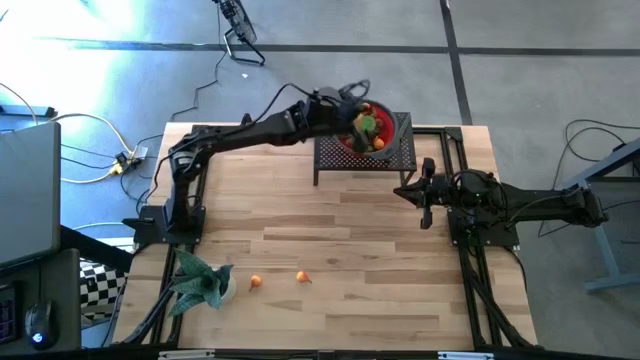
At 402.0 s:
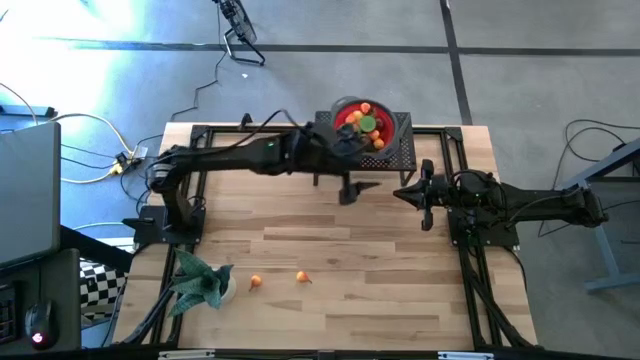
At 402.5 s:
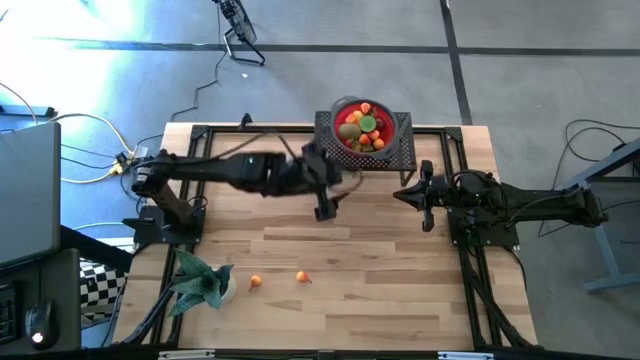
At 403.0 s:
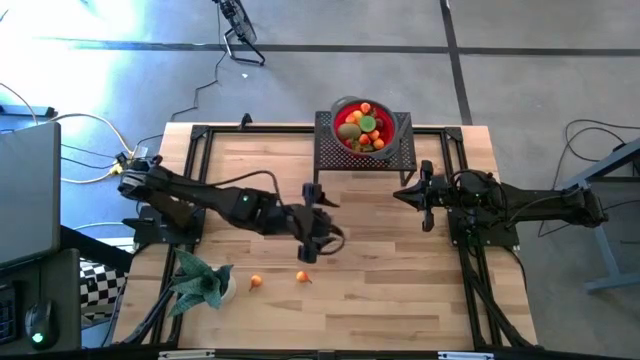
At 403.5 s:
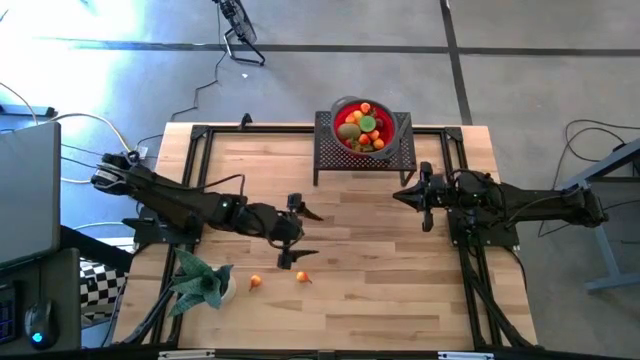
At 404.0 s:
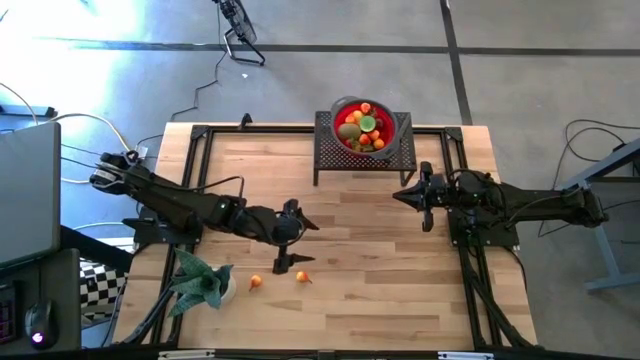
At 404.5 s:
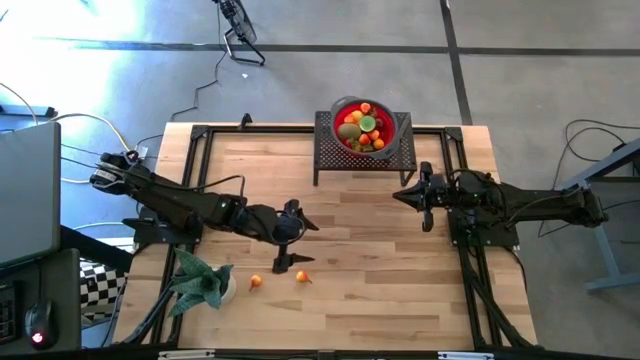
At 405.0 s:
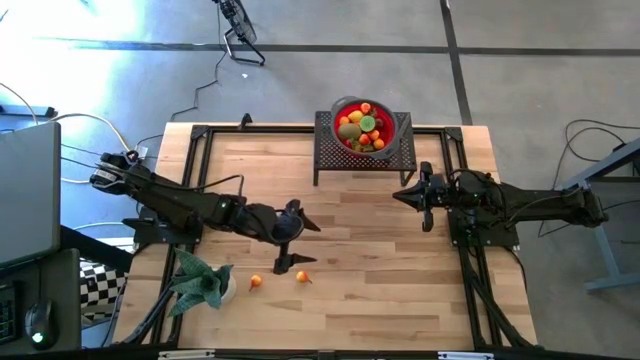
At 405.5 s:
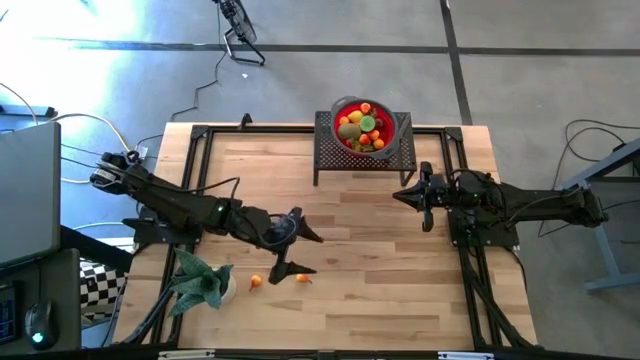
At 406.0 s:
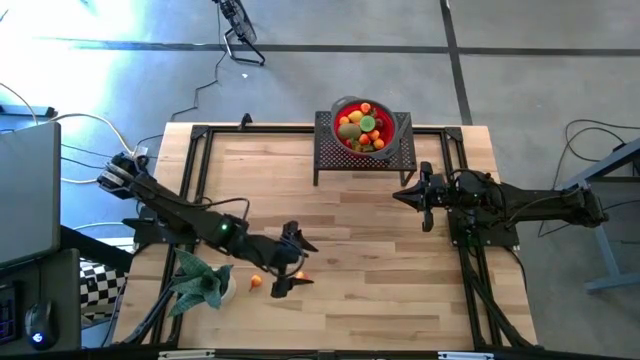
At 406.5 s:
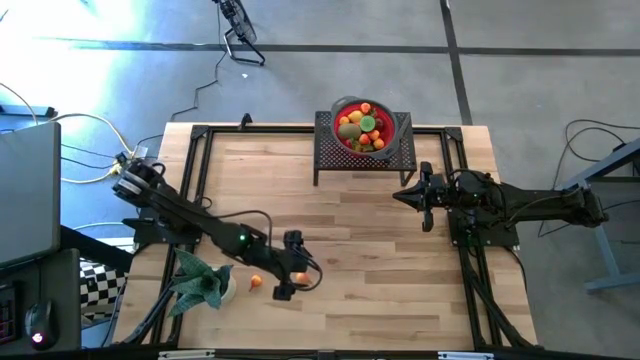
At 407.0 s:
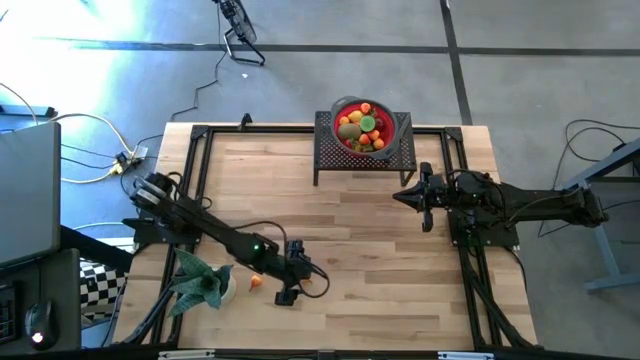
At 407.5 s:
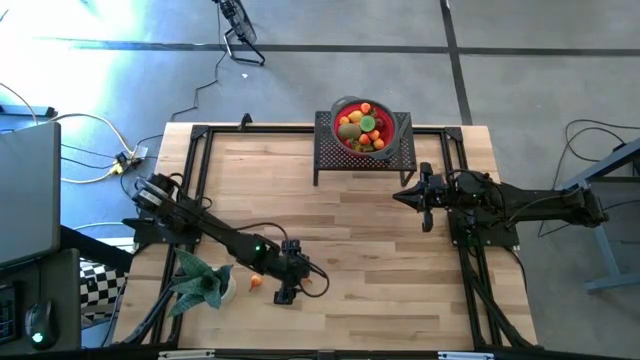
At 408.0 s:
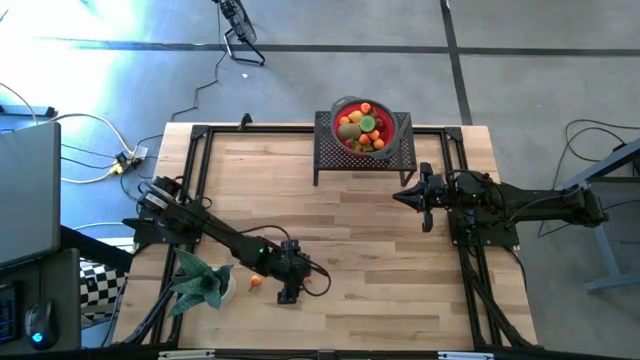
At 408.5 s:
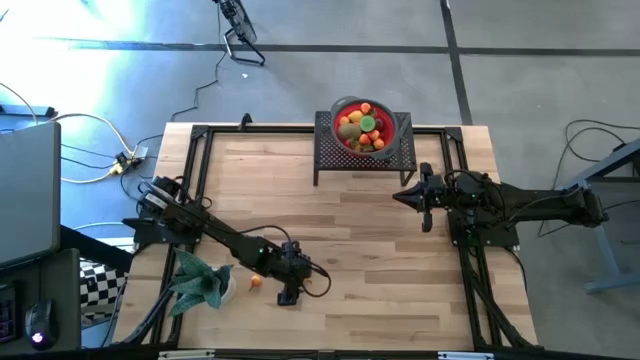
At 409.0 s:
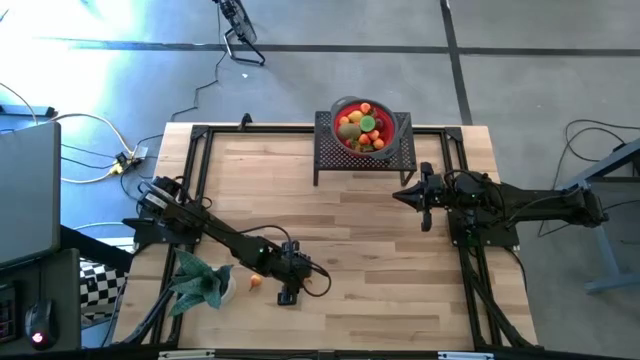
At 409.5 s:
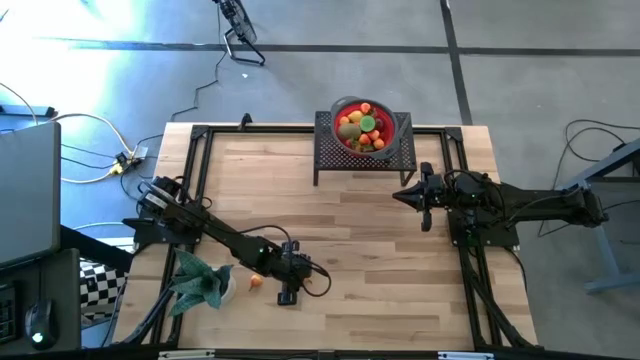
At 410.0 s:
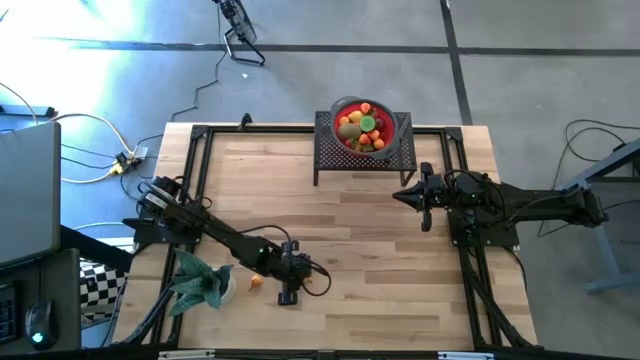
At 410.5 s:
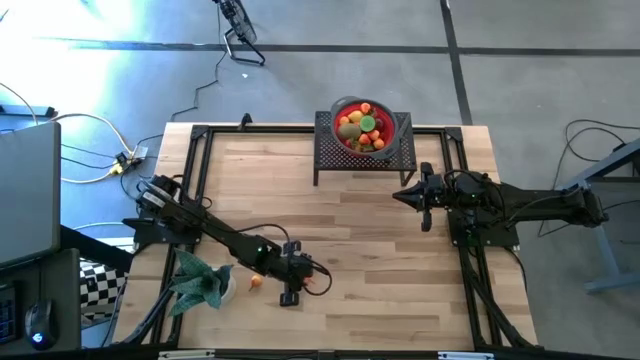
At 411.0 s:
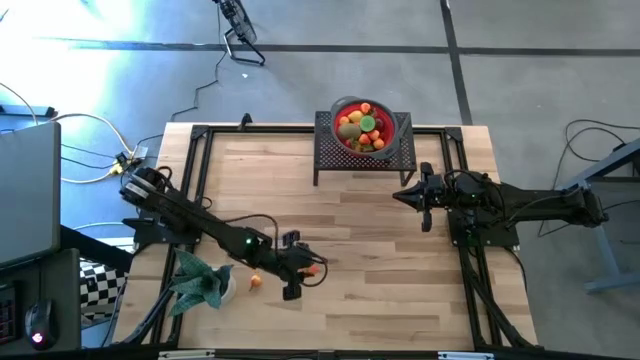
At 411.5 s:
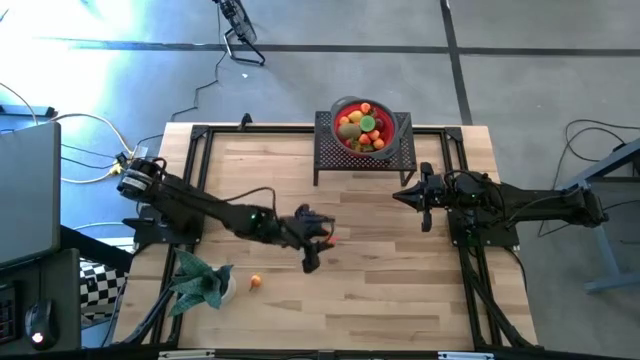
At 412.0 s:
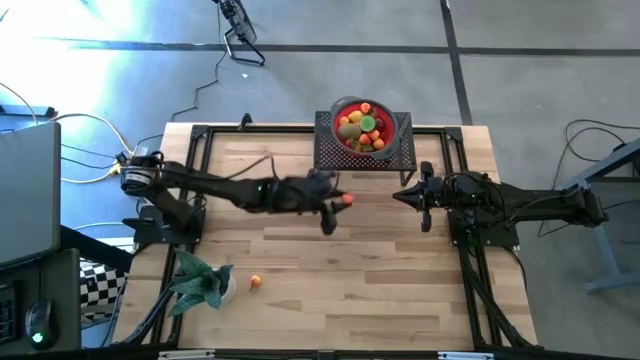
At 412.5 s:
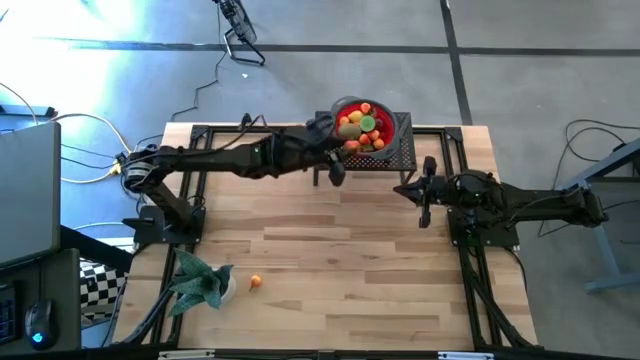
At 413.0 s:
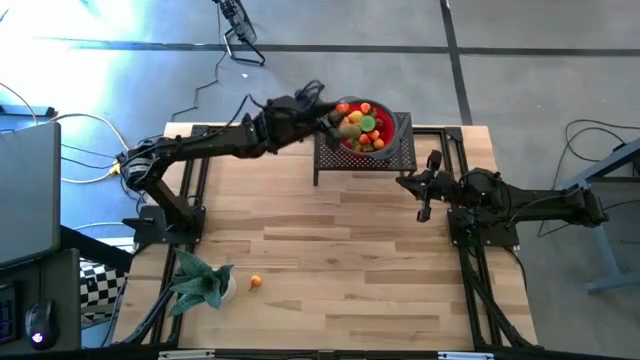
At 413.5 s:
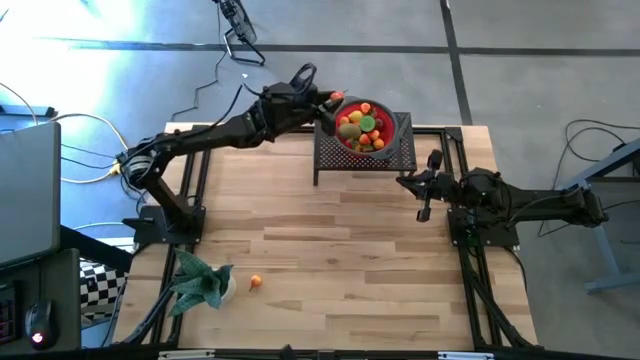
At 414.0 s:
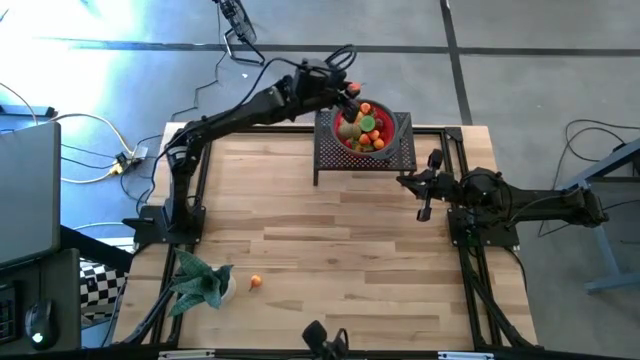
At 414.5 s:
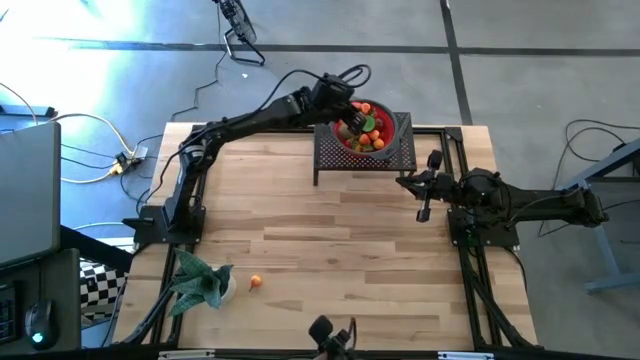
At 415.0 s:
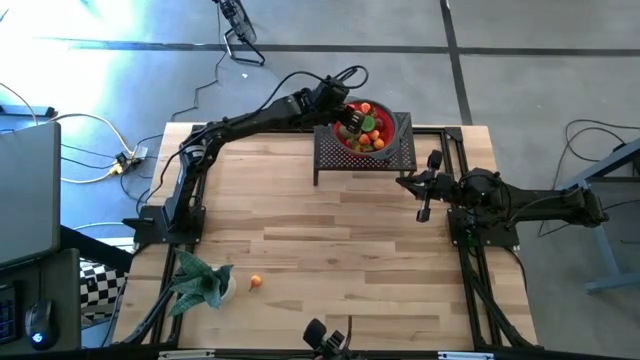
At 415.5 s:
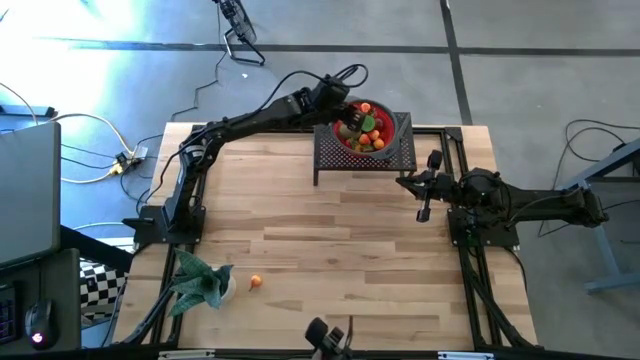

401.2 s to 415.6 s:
Task: Pick & Place Fruit
Put the pear into the strainer on the shelf

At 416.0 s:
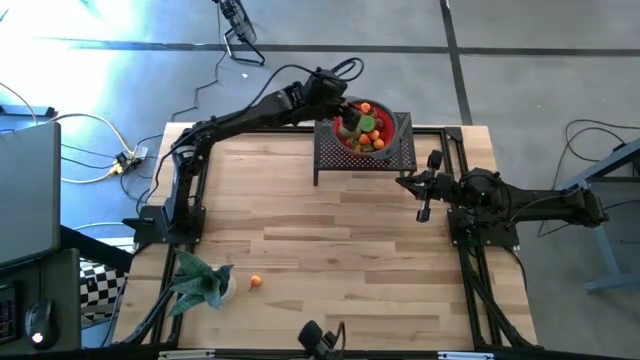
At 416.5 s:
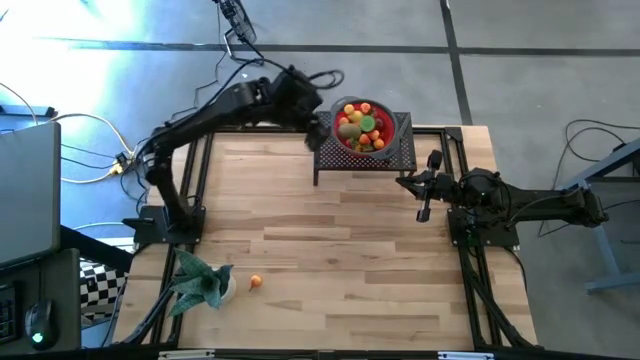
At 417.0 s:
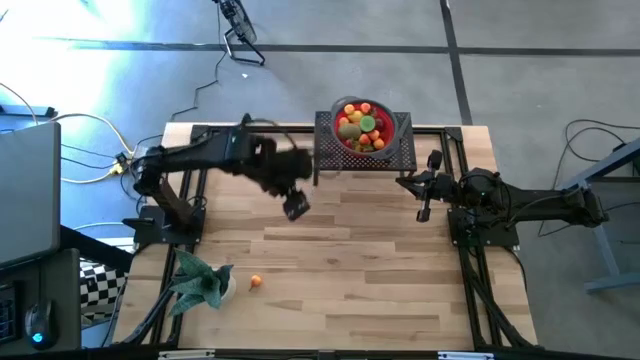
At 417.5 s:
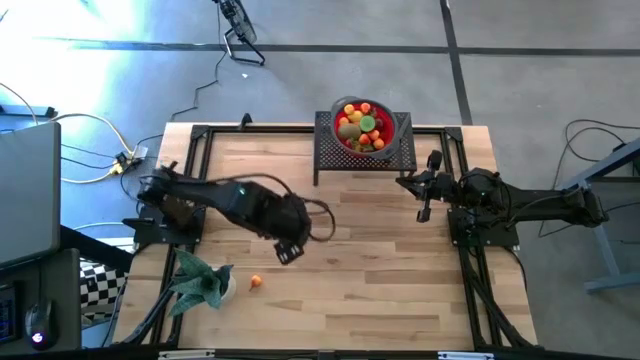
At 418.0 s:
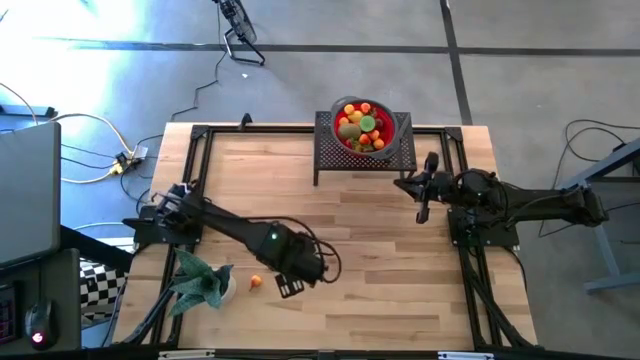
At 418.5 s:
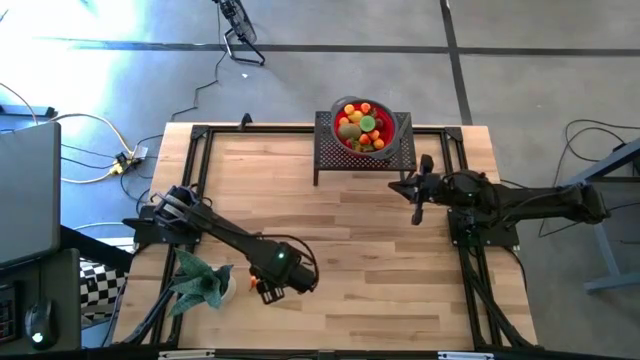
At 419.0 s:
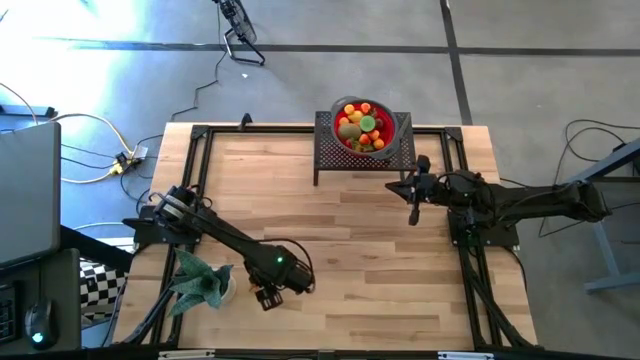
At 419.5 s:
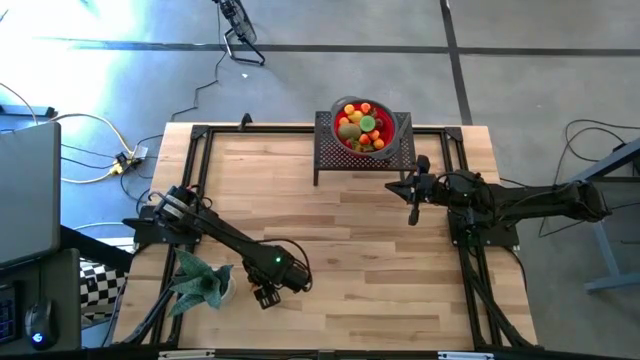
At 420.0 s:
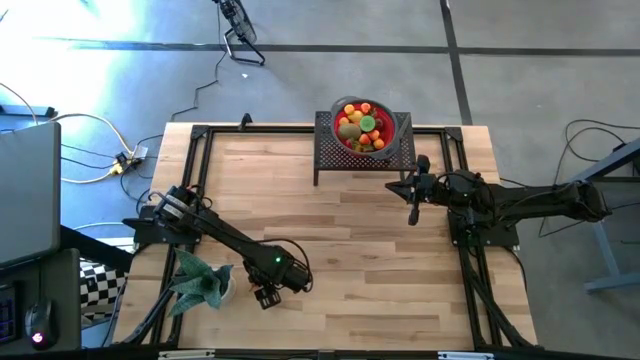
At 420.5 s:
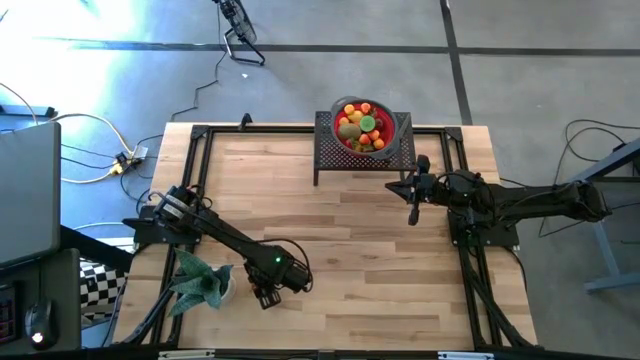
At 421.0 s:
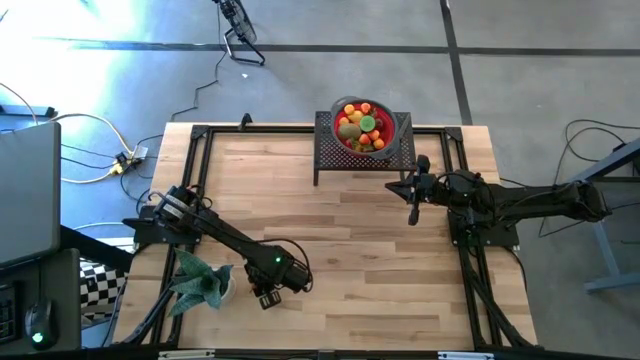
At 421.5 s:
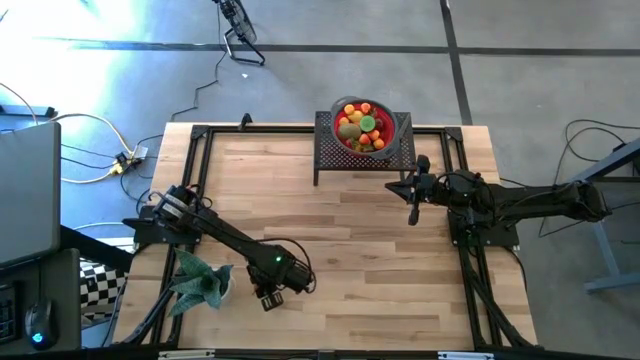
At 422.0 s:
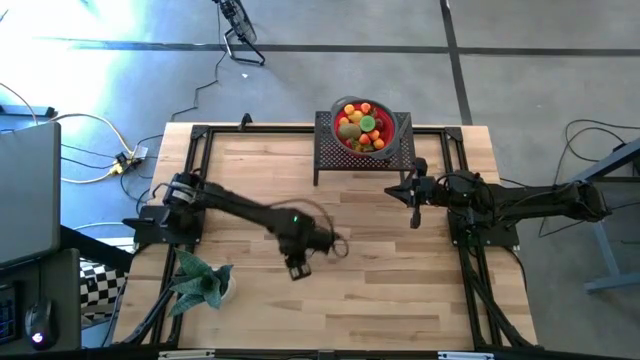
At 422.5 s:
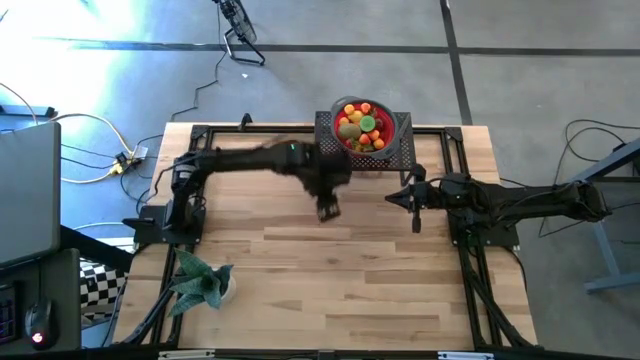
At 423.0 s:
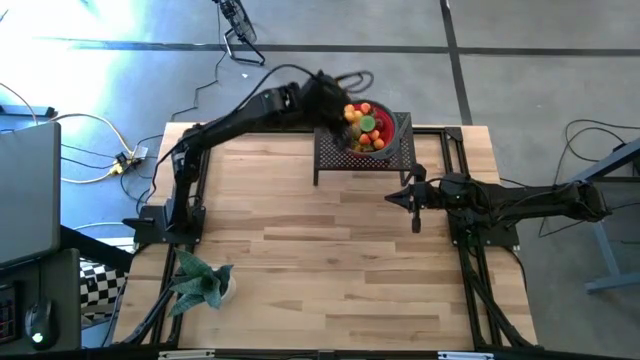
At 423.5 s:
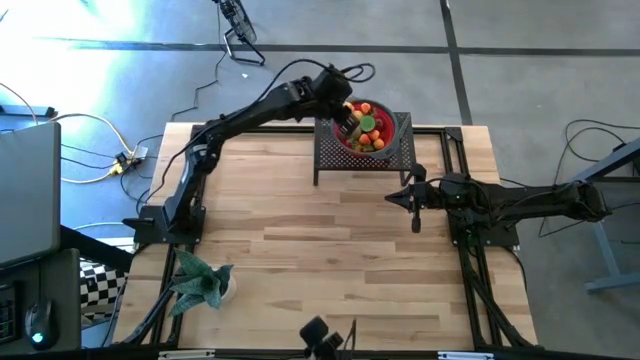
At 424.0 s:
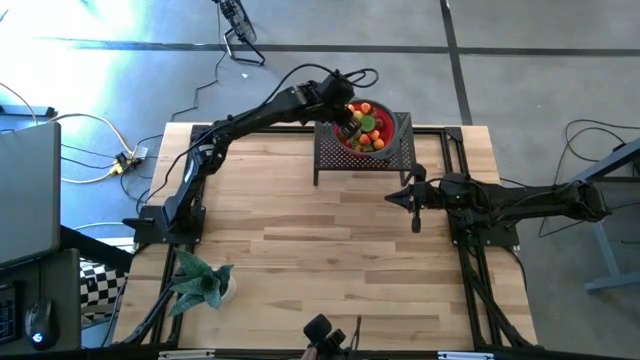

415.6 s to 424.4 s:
Put the pear into the strainer on the shelf
